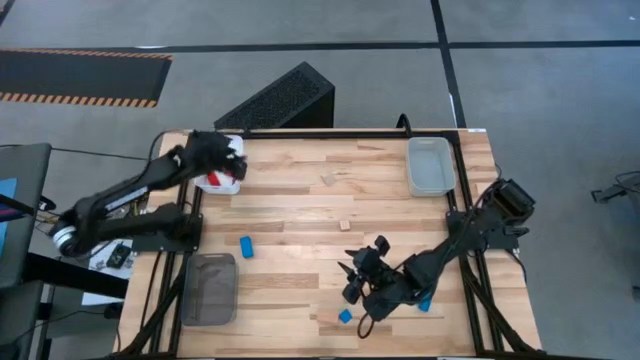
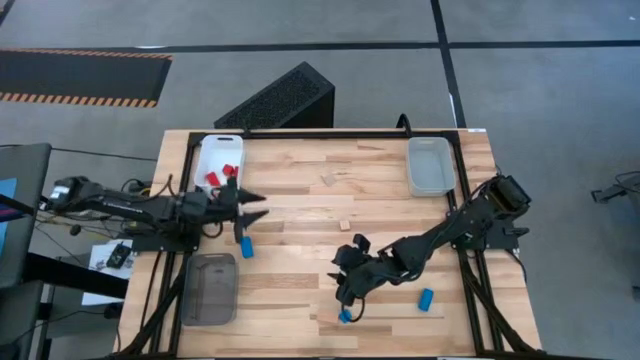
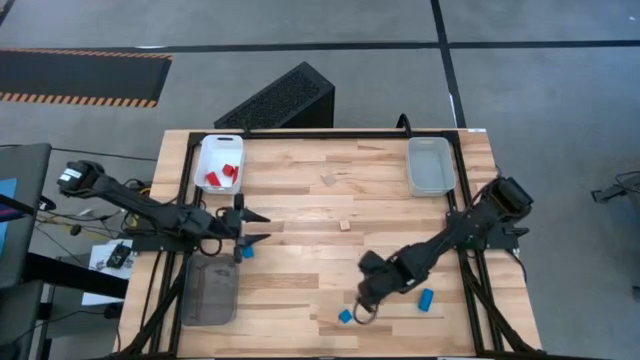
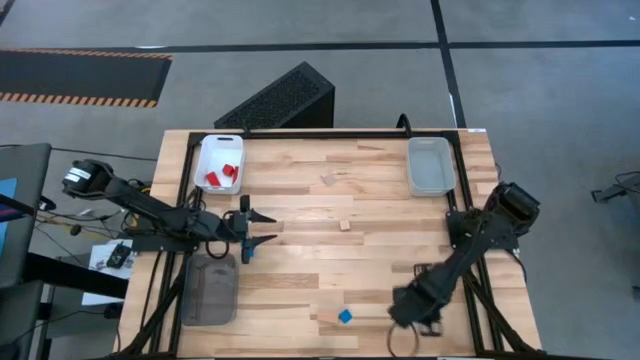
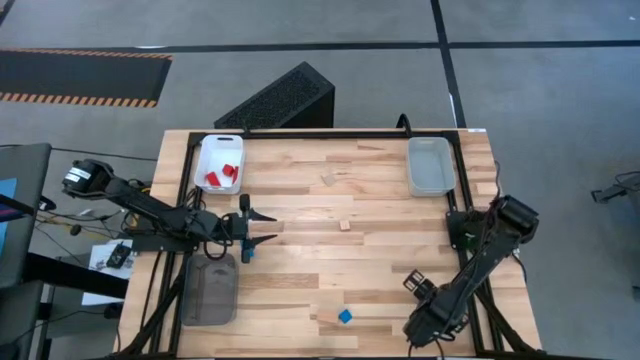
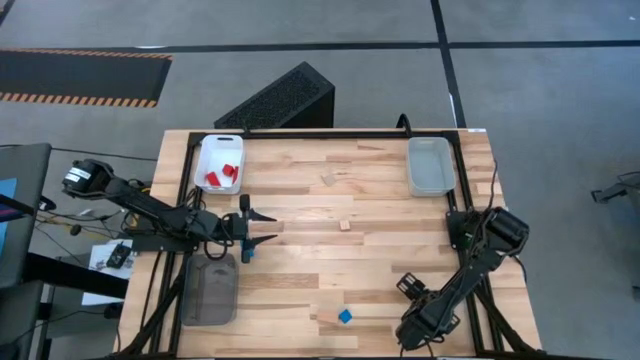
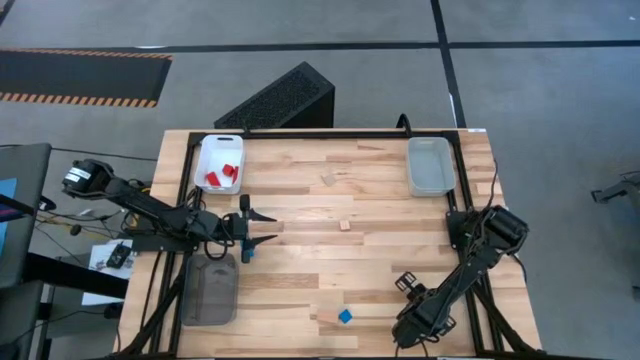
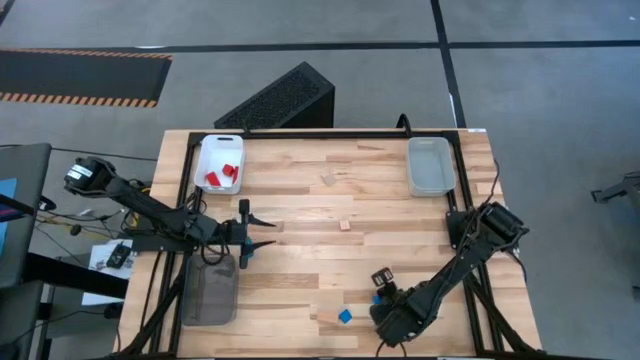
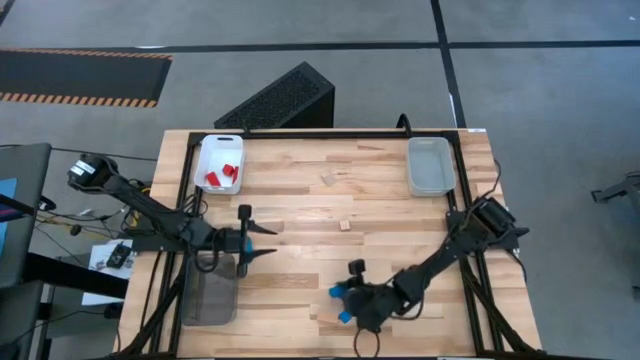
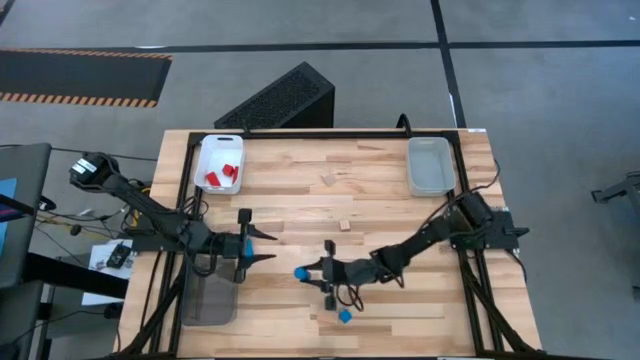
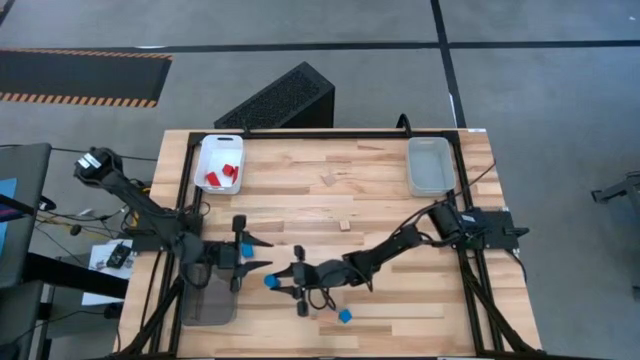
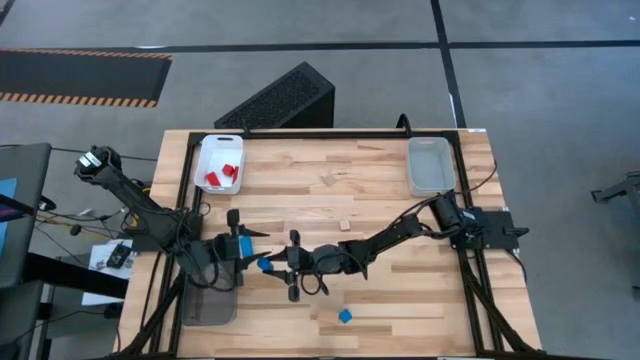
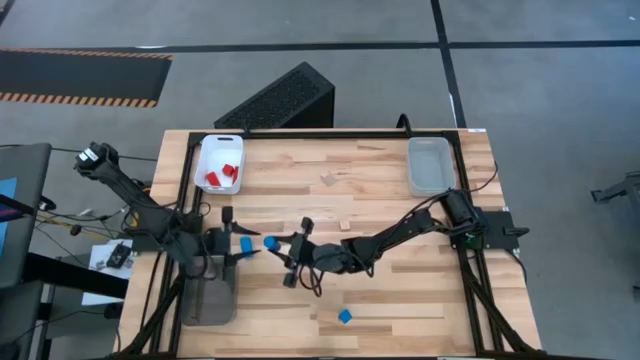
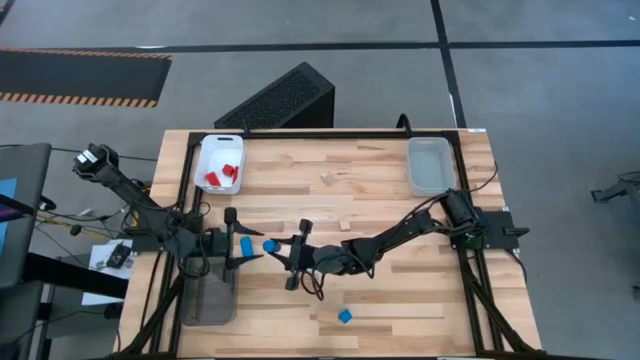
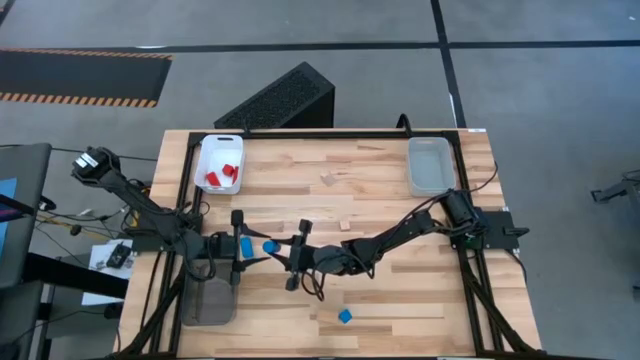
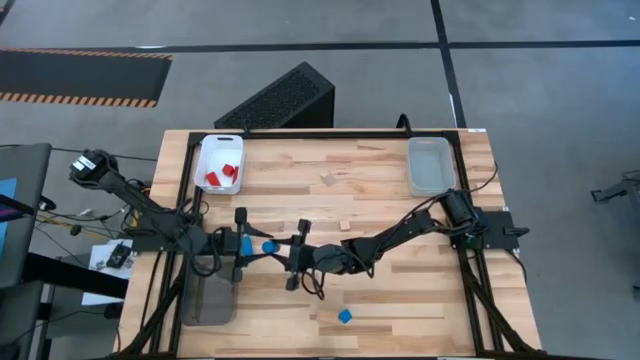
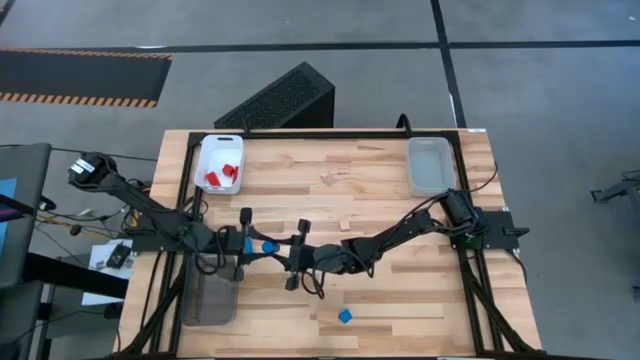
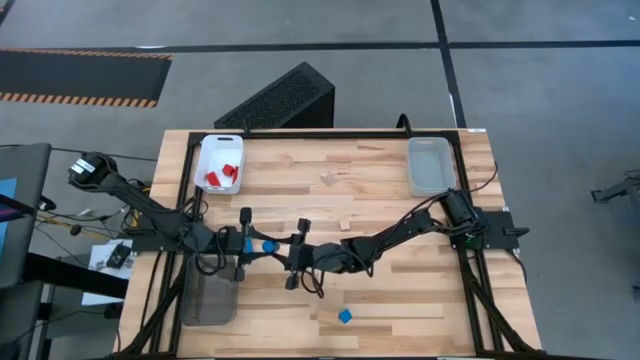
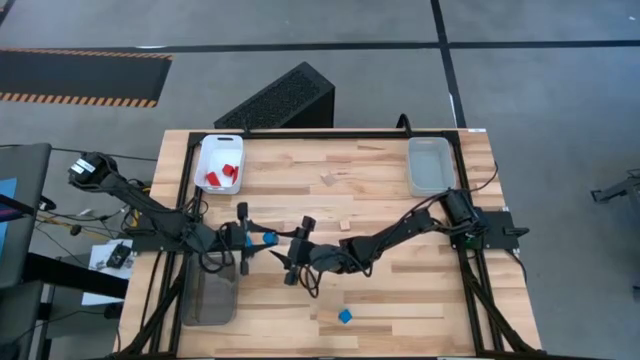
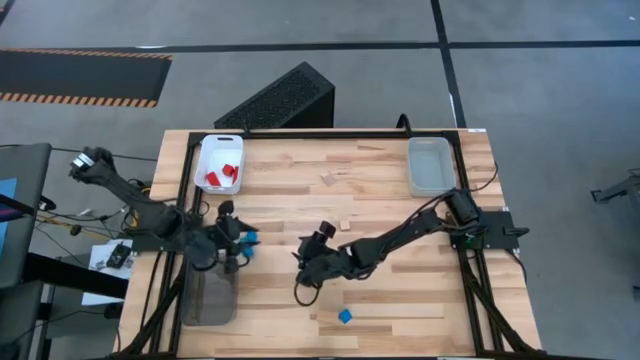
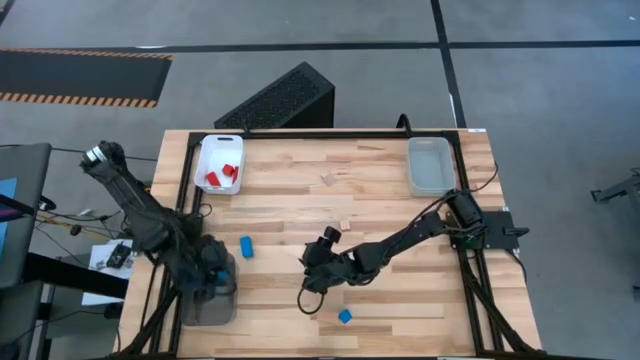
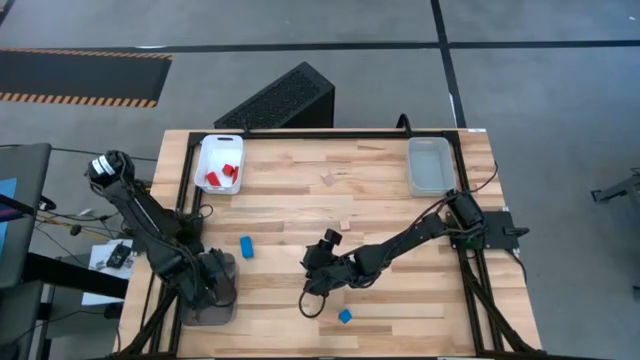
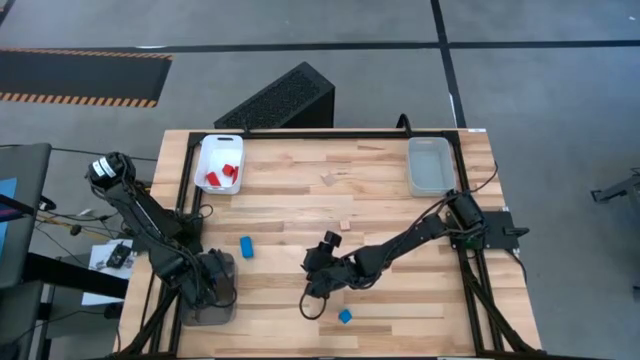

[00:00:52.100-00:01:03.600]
Task: Sort & place blocks by color
Put the bottom right blue block into the black bin

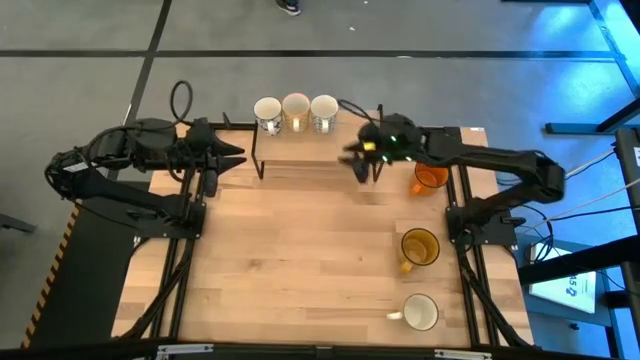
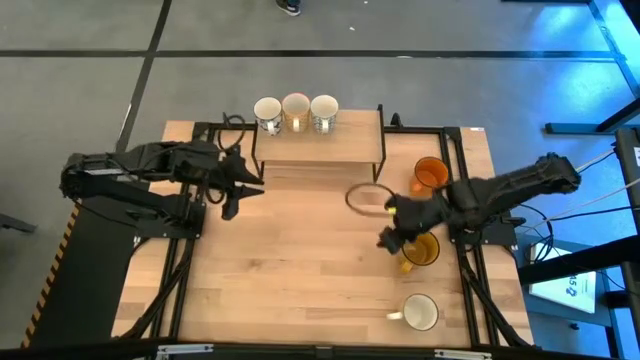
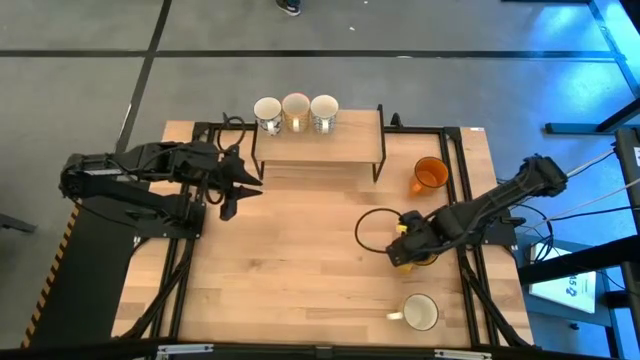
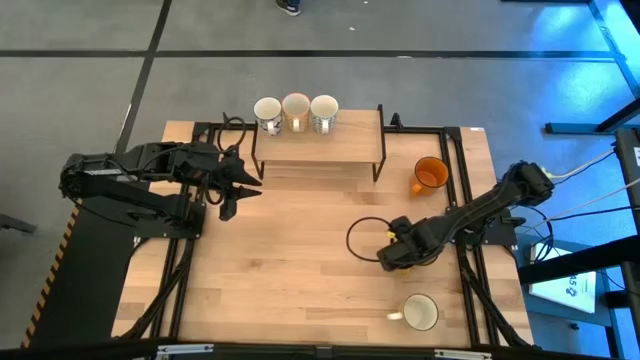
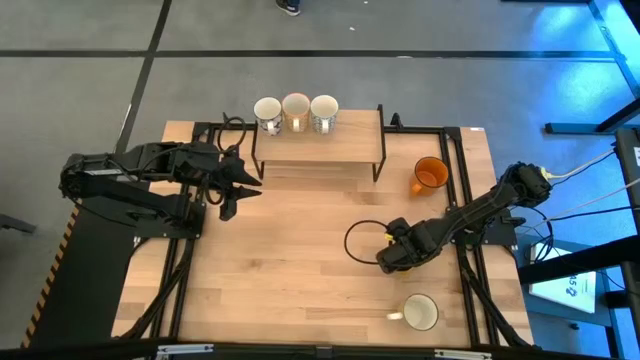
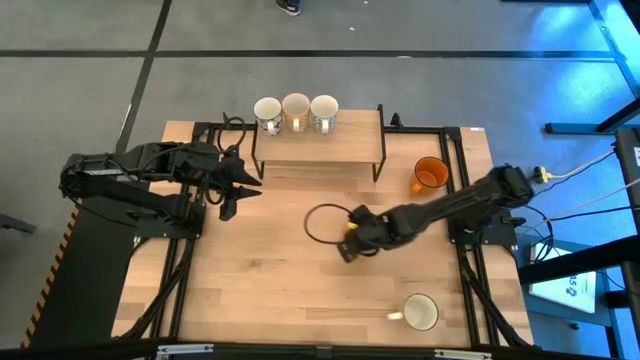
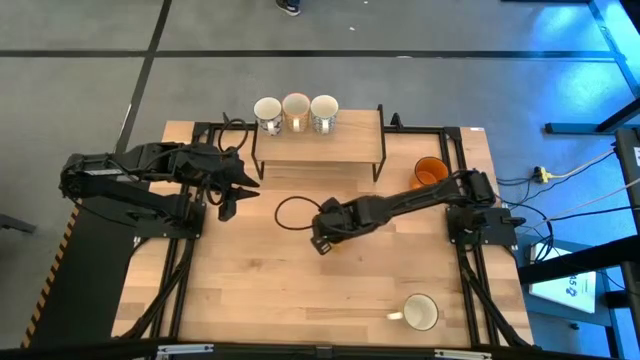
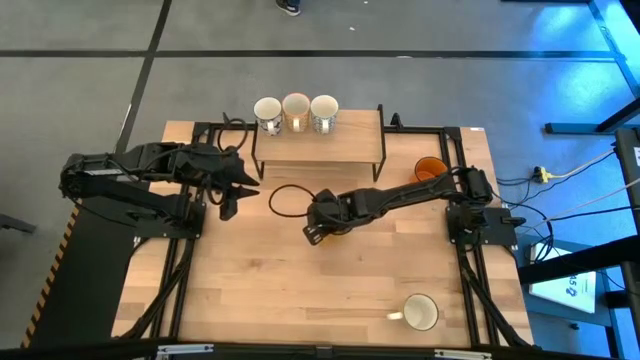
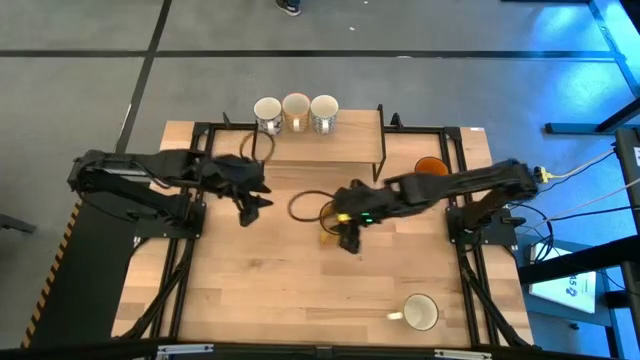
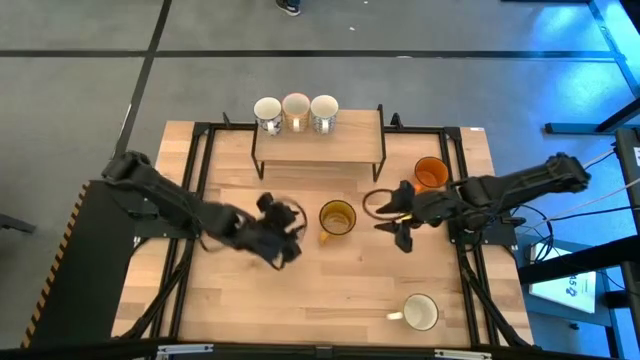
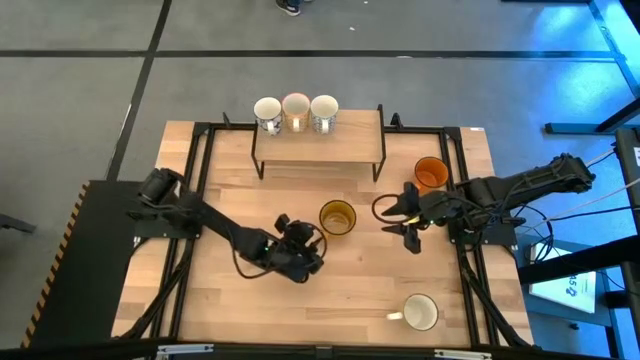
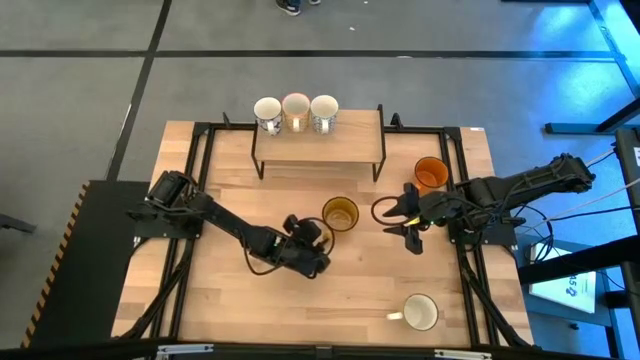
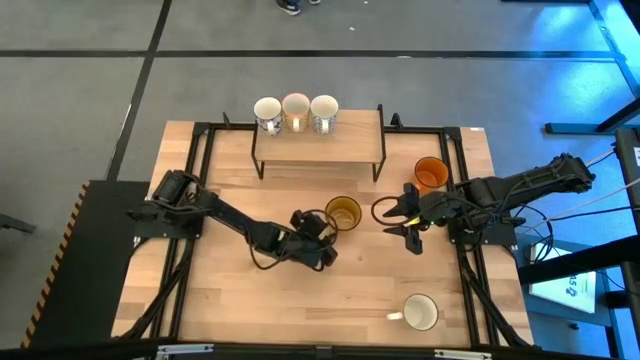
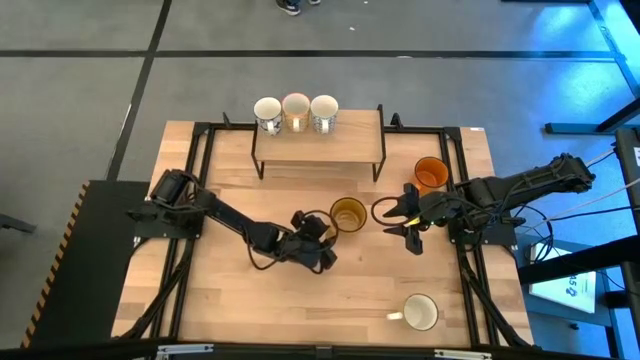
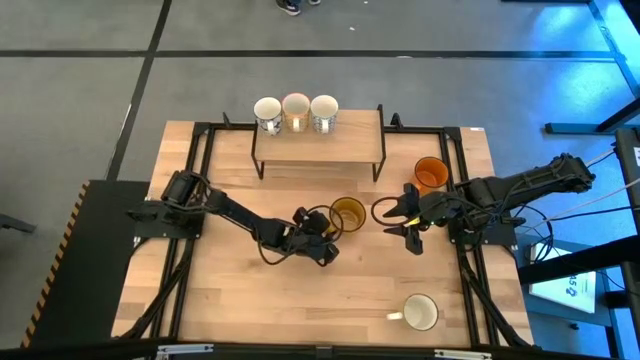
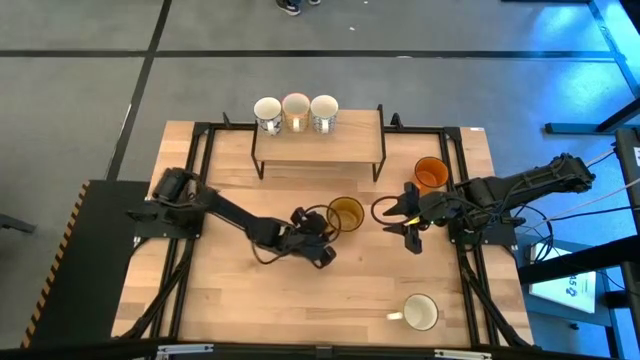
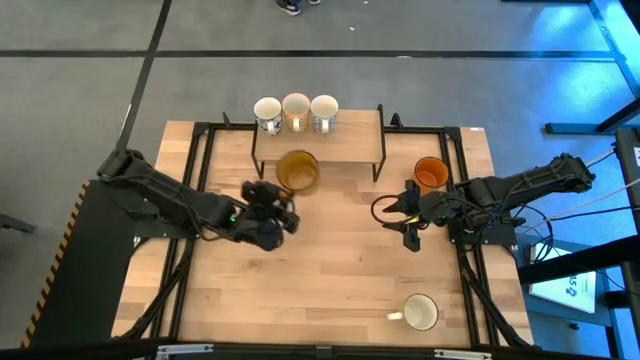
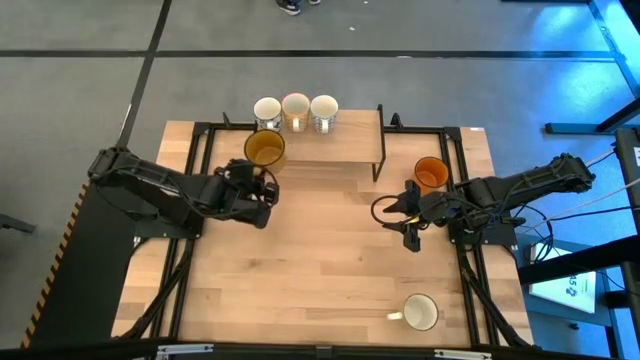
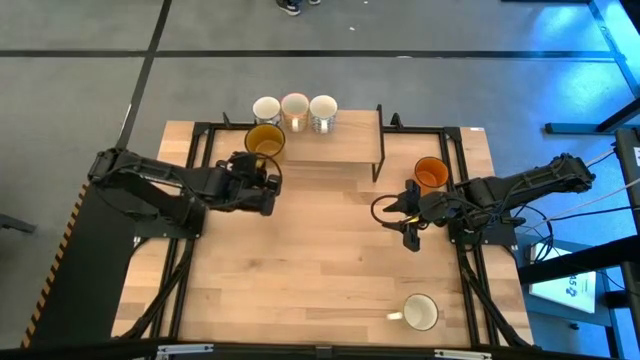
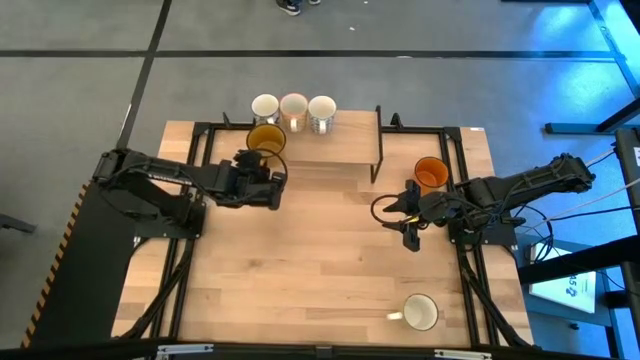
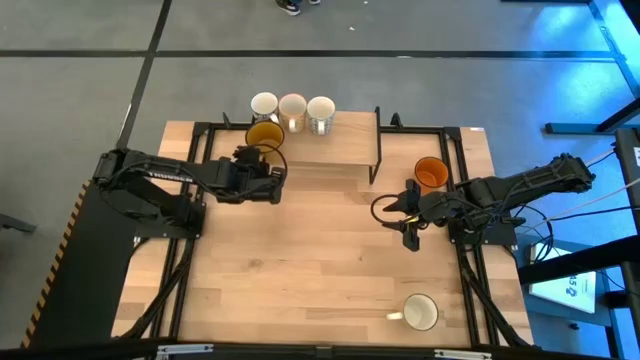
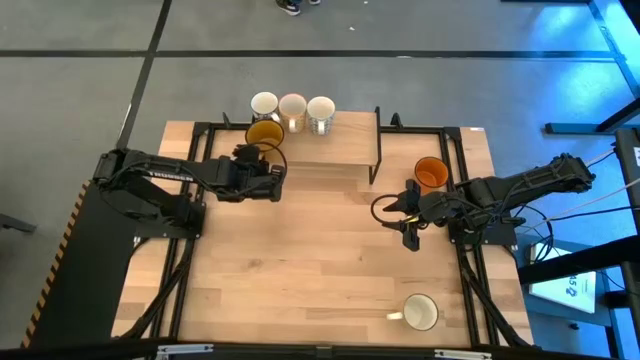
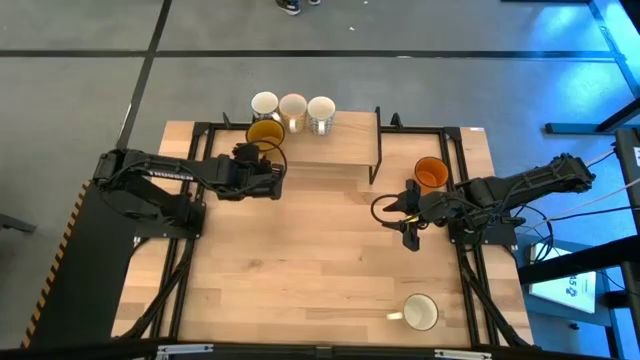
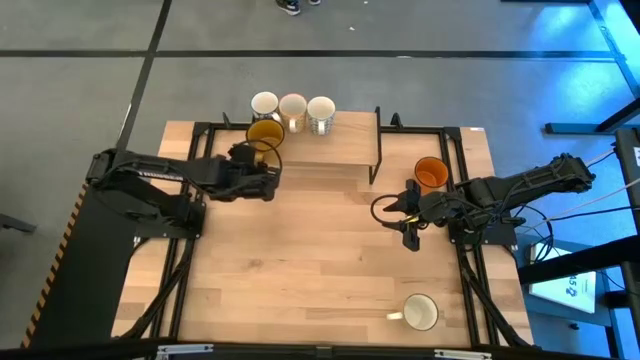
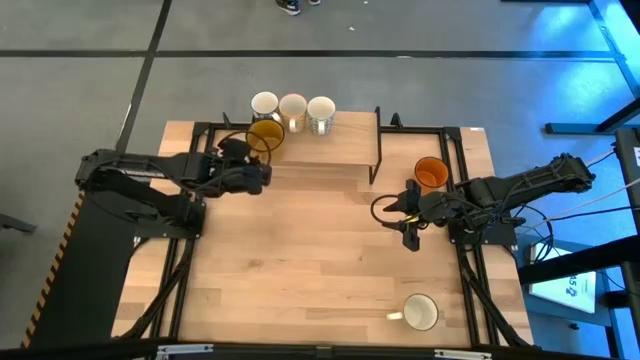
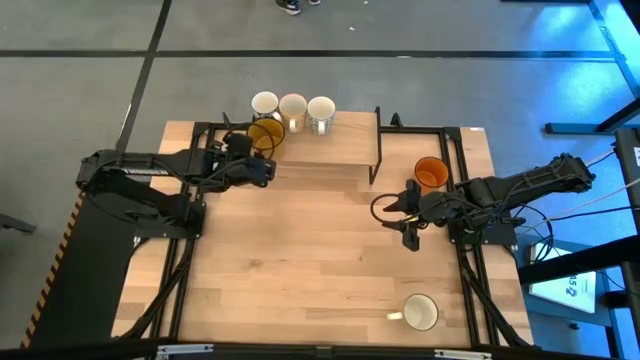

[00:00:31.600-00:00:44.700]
Task: Place coffee mugs
Put the yellow mug on the shelf
